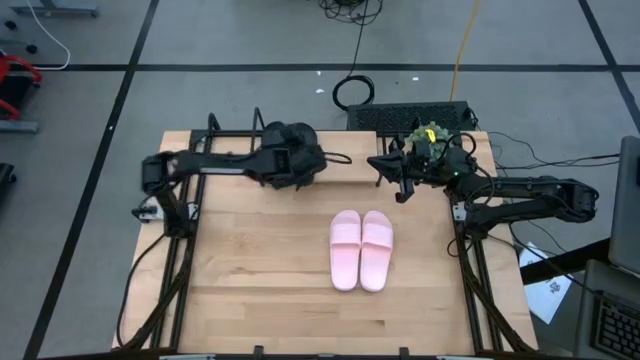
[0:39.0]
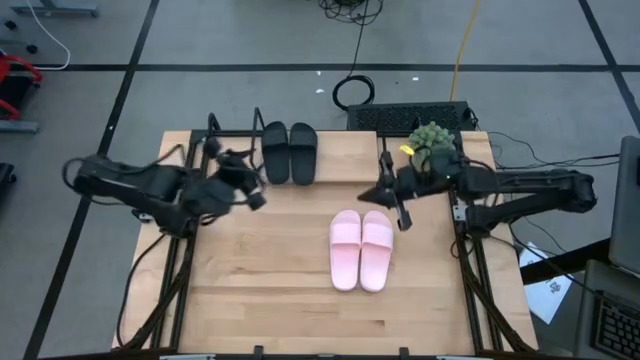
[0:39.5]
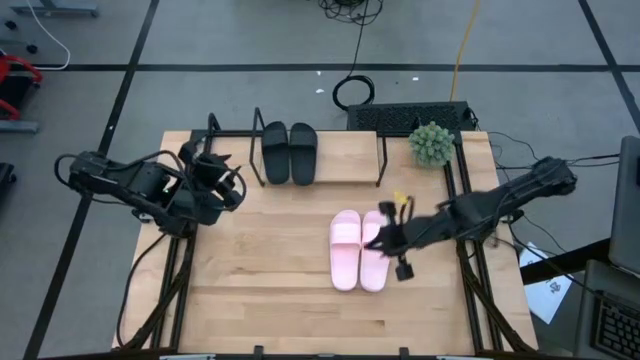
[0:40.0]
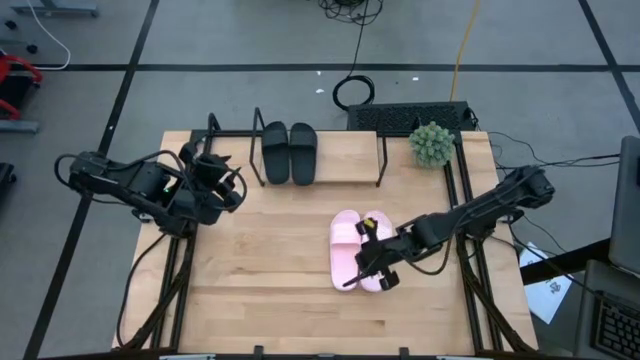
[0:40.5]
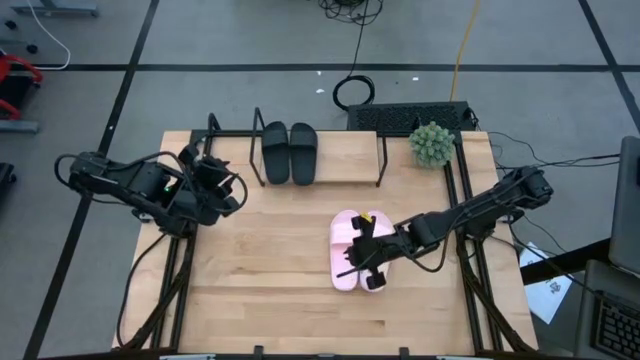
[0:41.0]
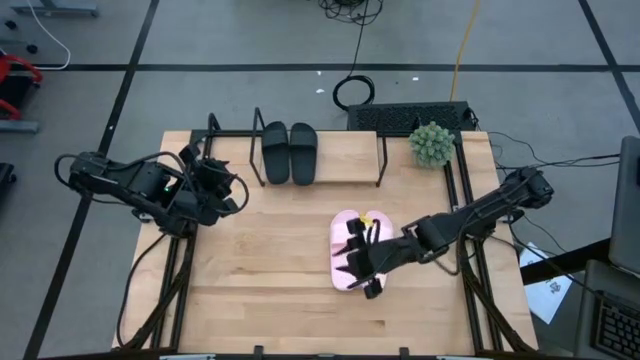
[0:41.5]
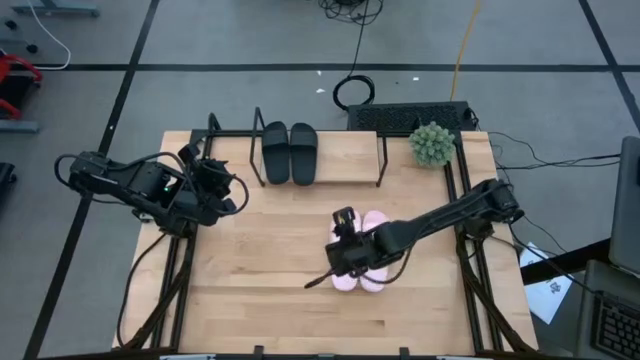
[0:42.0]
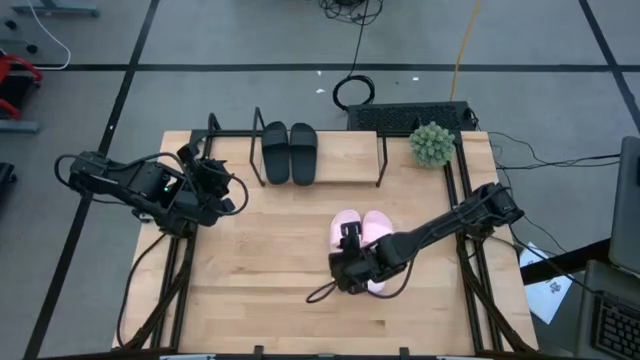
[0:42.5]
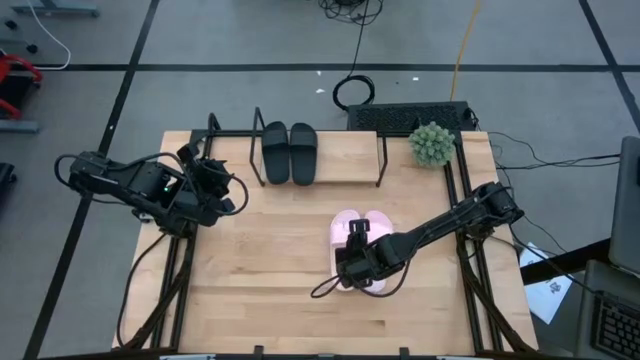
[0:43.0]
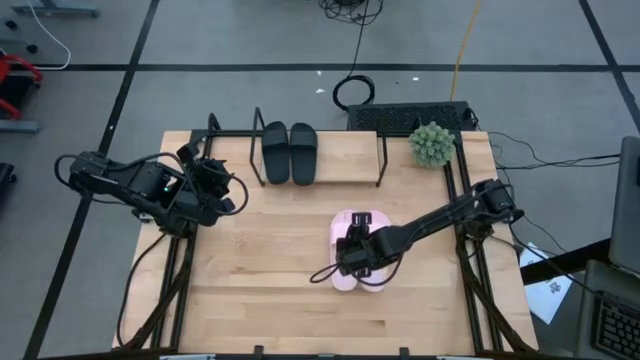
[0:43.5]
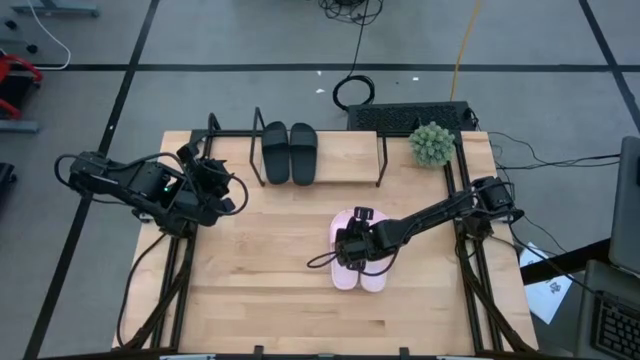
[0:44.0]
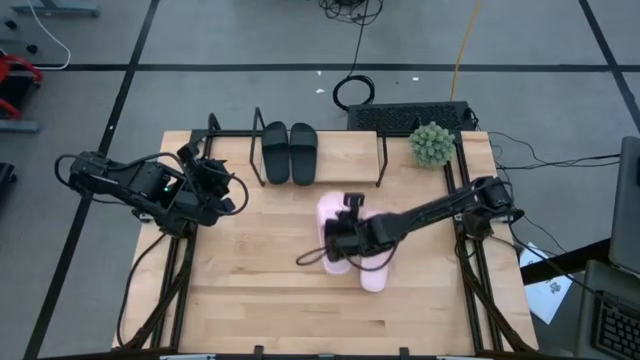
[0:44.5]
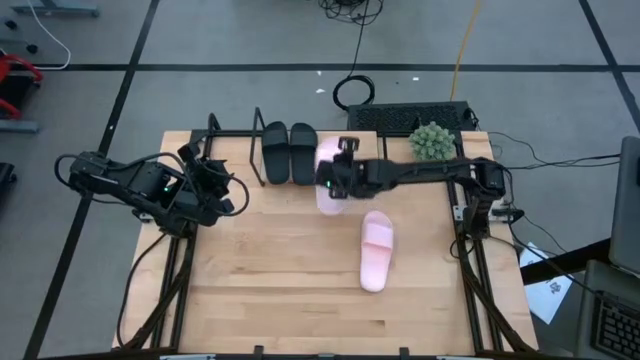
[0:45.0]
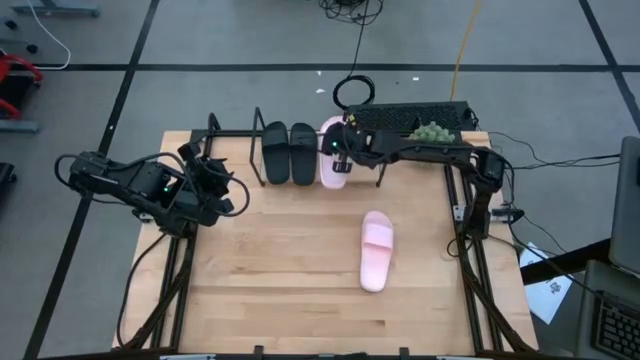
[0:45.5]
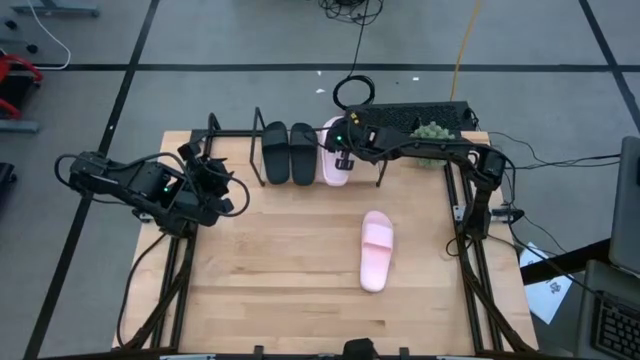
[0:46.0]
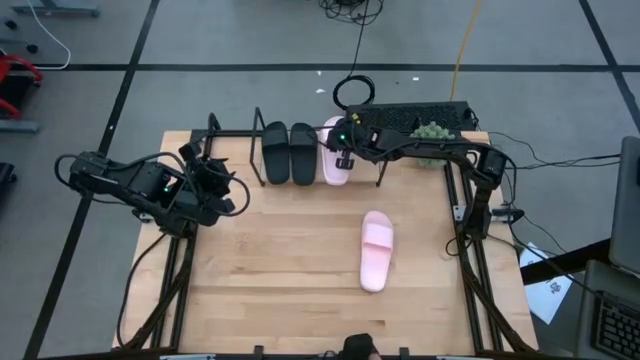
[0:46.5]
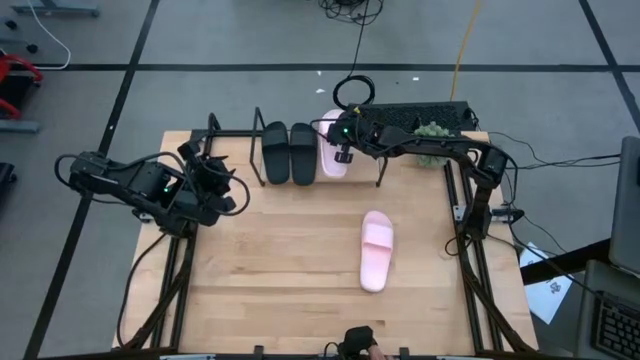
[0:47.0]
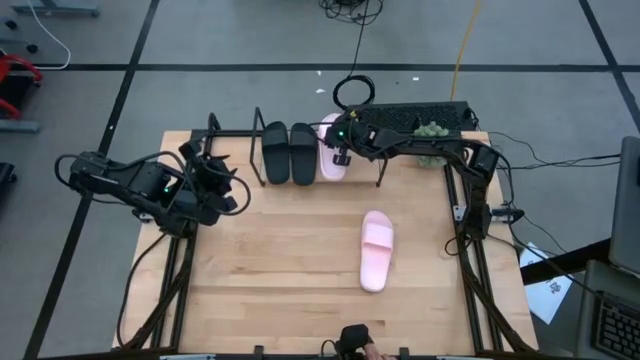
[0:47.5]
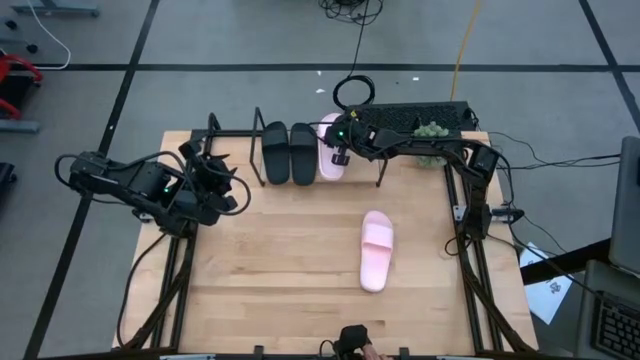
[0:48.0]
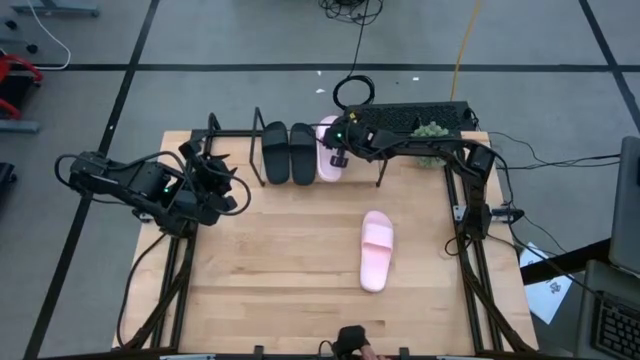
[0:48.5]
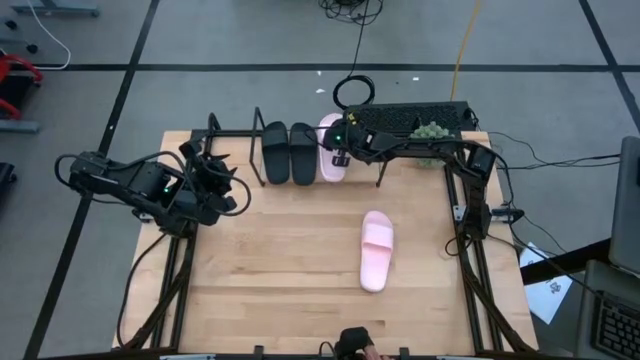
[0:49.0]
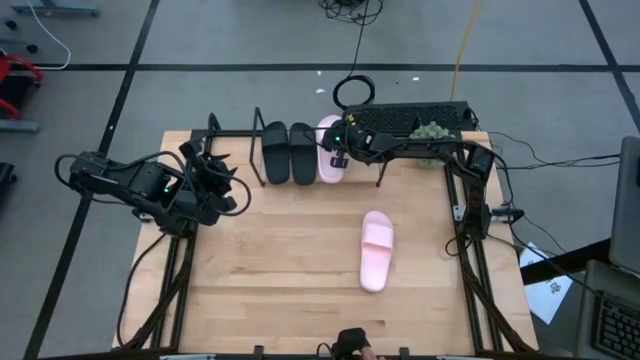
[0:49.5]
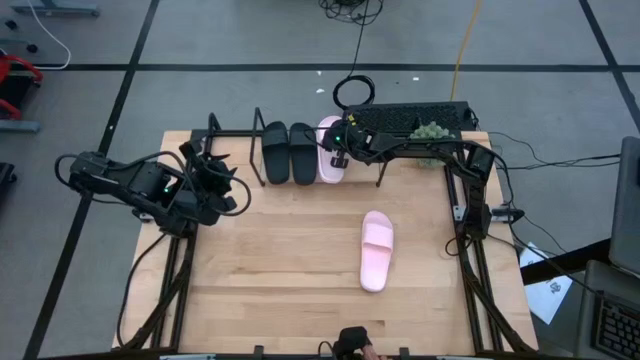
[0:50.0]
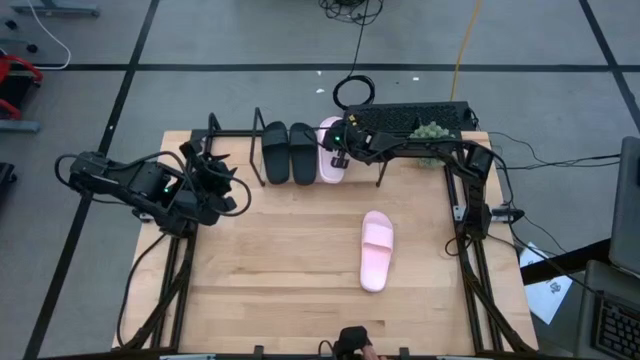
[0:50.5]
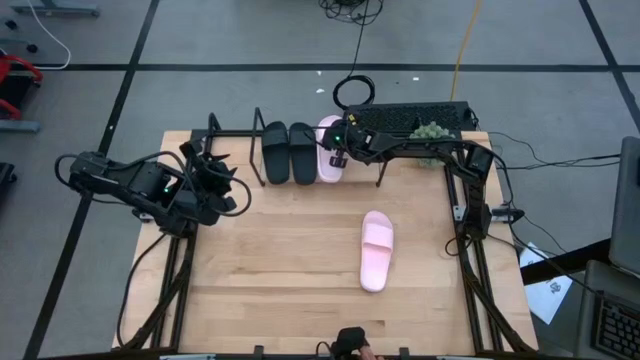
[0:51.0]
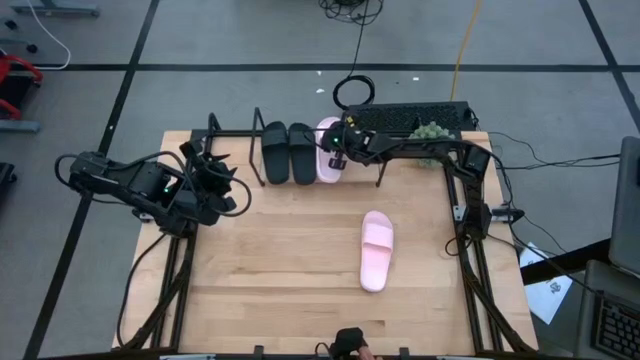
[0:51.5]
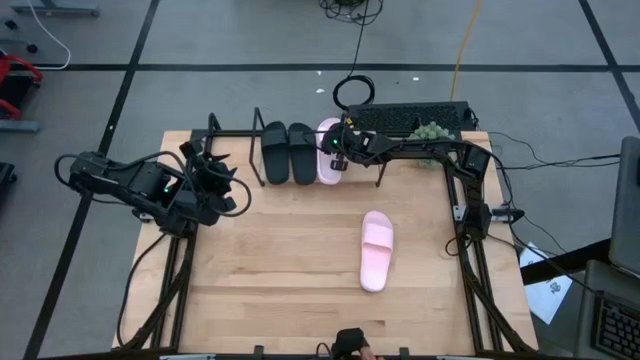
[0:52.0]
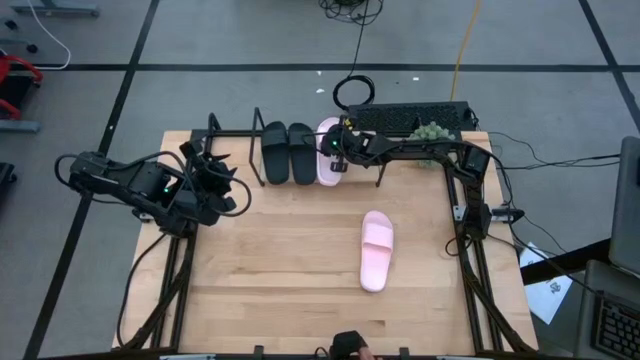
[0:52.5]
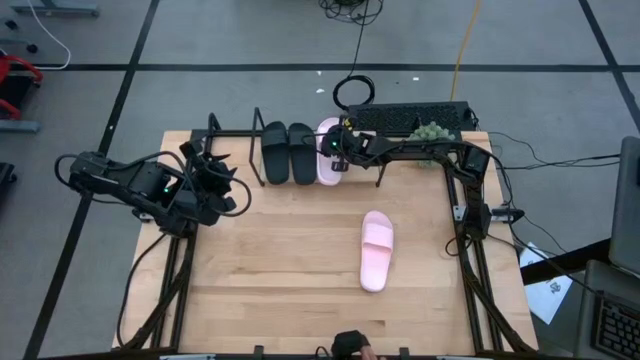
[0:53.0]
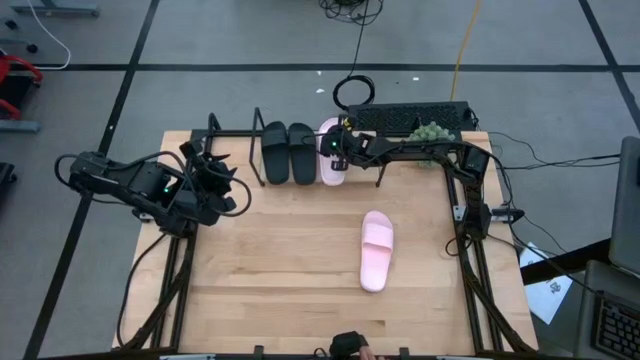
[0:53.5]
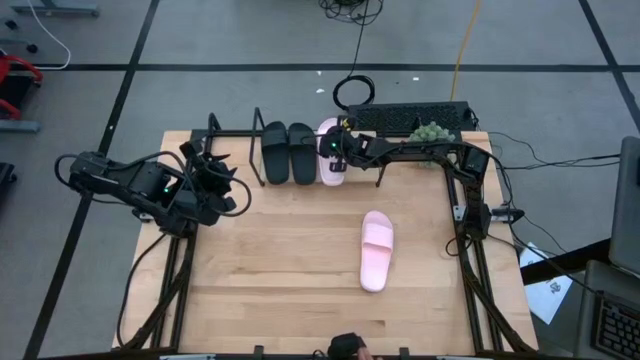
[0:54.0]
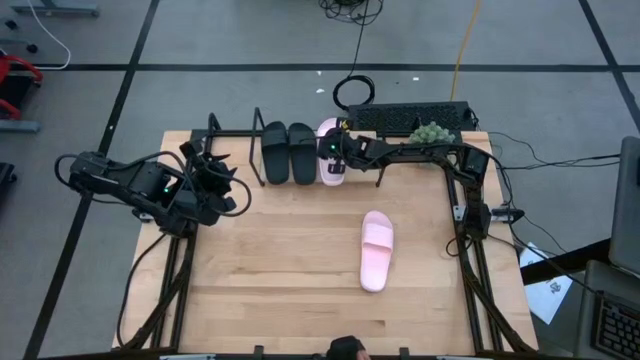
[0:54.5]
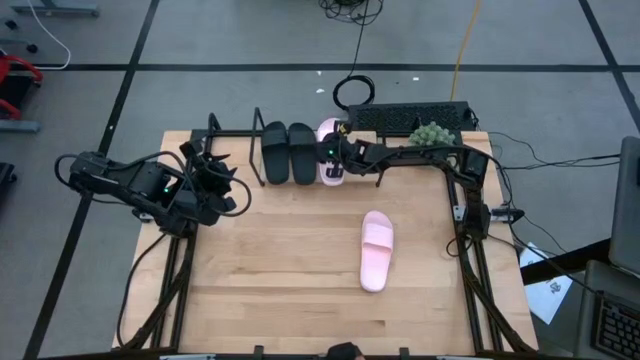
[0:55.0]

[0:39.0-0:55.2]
Task: Pick and place slides into the shelf
Put the left white slide on the shelf

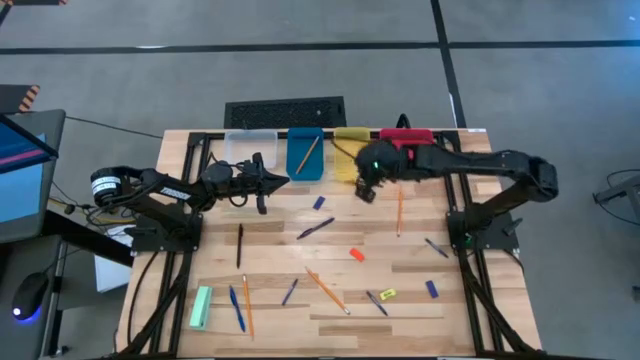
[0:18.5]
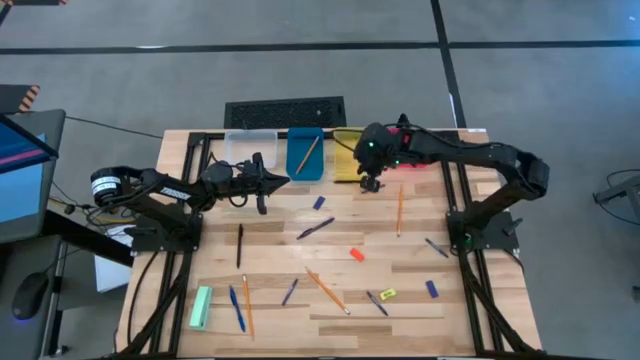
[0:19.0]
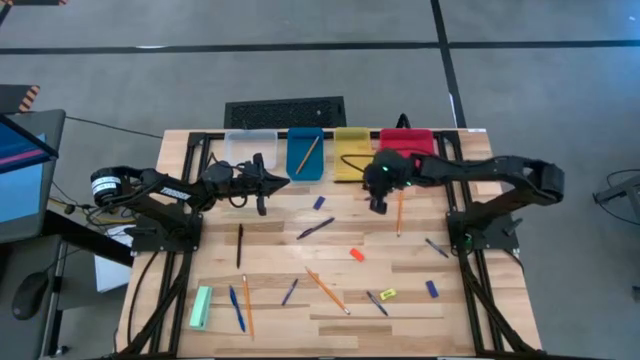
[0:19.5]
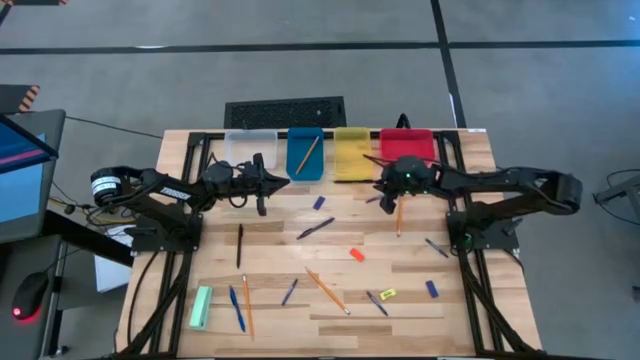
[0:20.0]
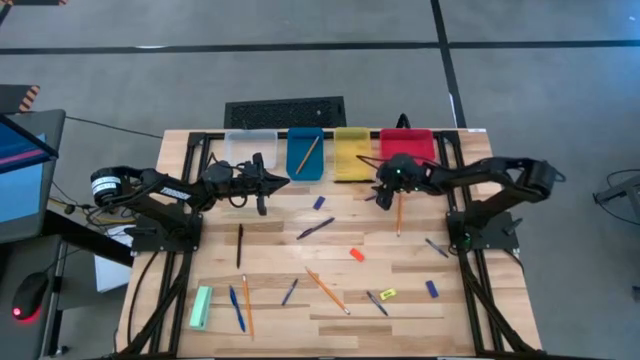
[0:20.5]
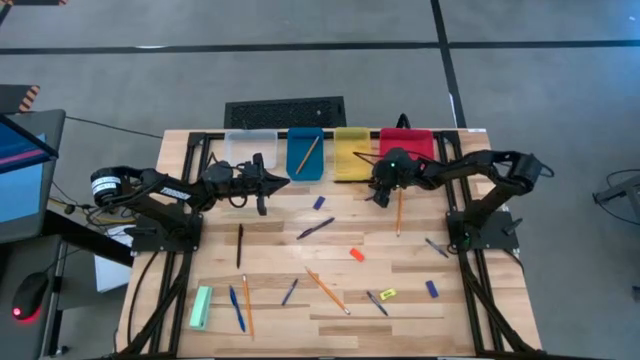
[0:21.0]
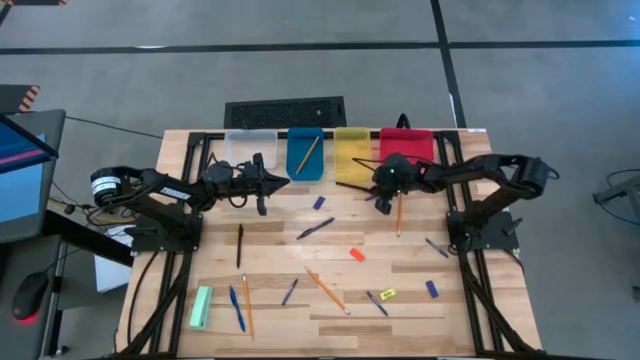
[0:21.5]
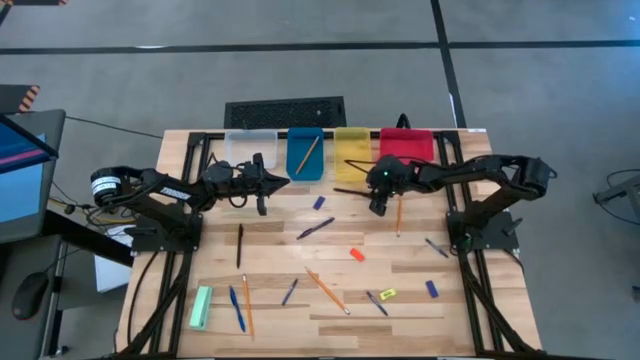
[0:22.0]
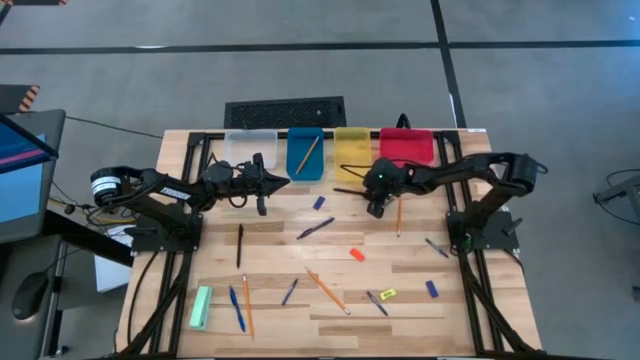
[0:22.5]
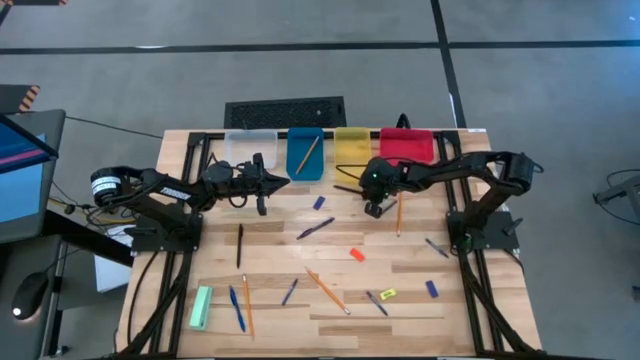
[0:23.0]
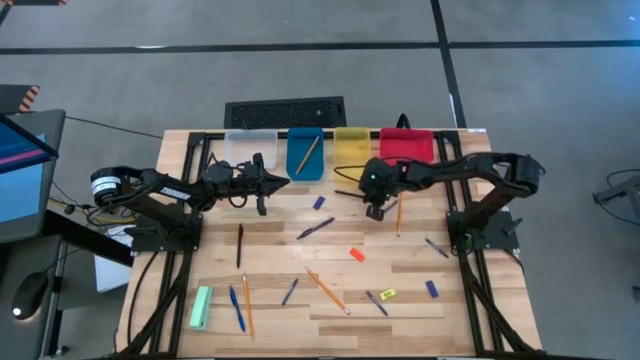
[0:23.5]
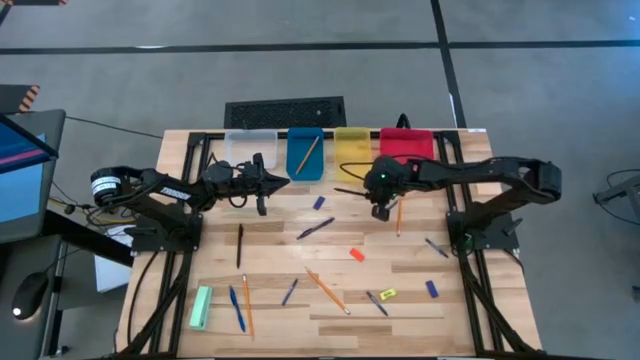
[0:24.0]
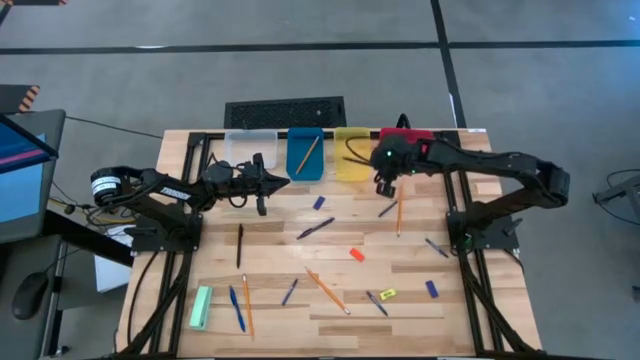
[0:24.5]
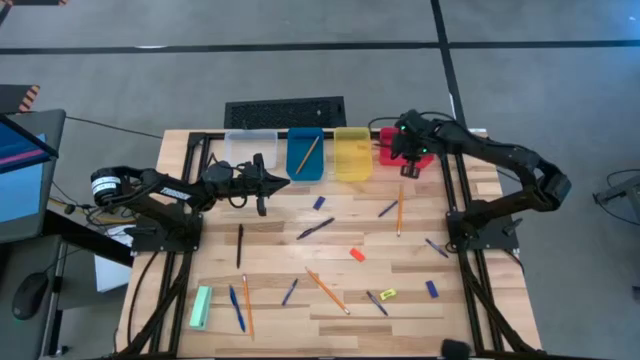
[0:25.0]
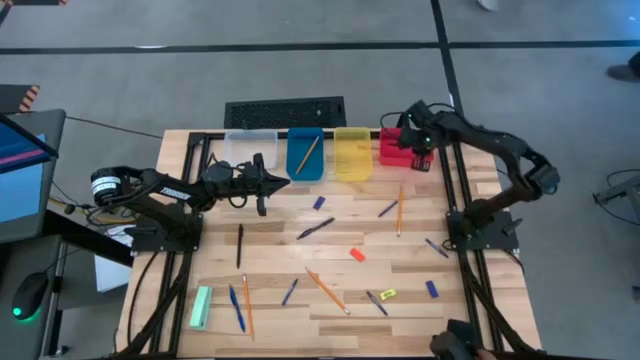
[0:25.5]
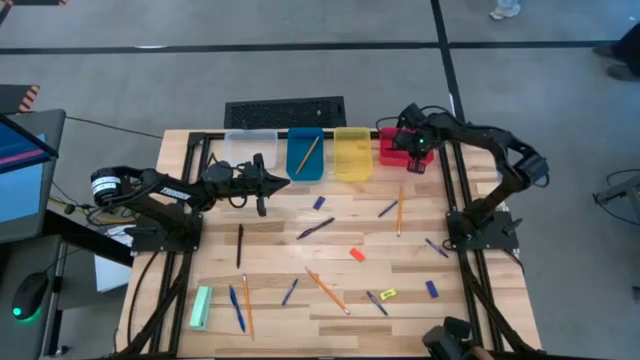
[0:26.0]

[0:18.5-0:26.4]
Task: Sort crayons/erasers/pens/pencils in bins
Put the black pen into the red bin
